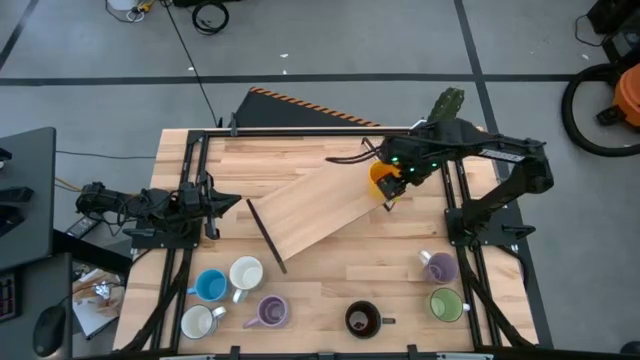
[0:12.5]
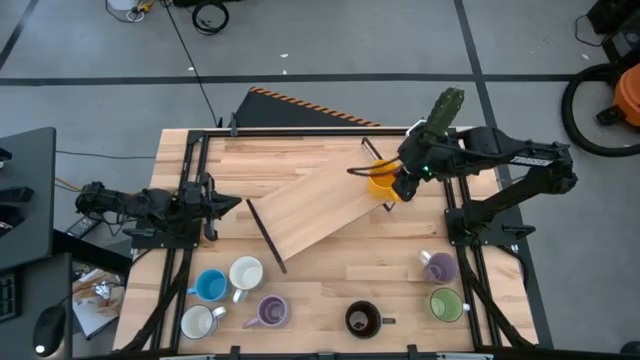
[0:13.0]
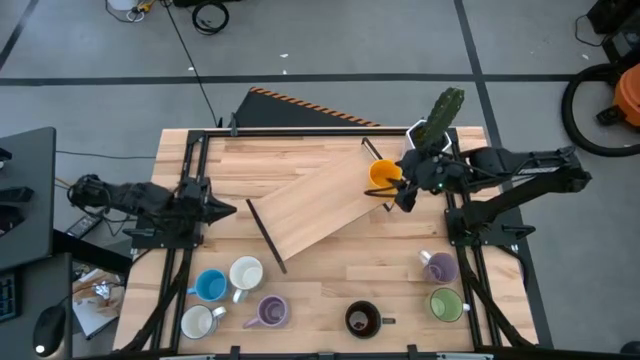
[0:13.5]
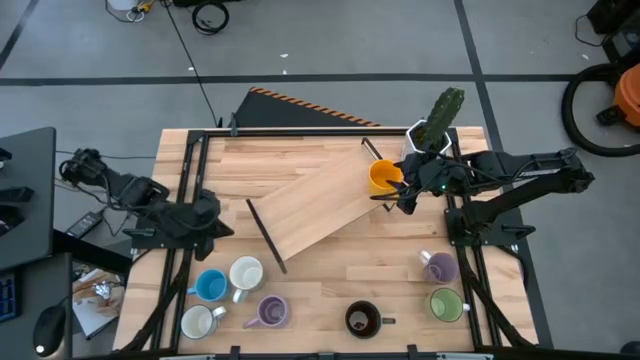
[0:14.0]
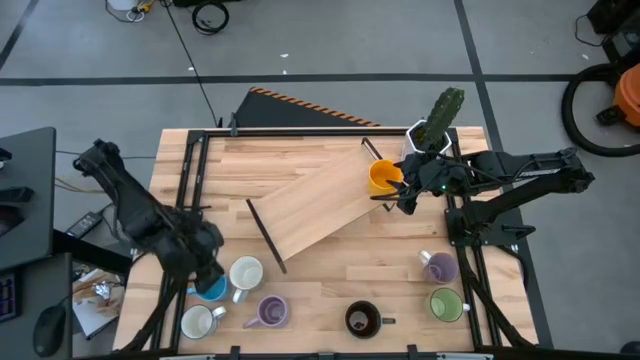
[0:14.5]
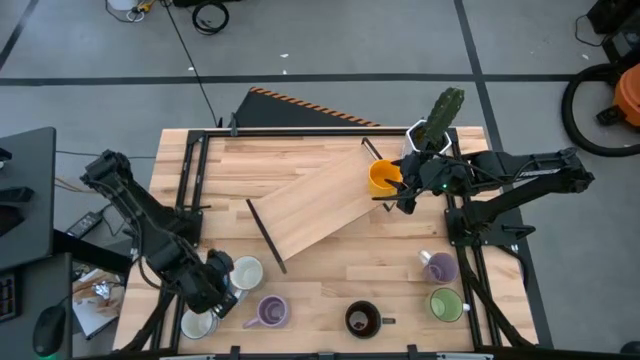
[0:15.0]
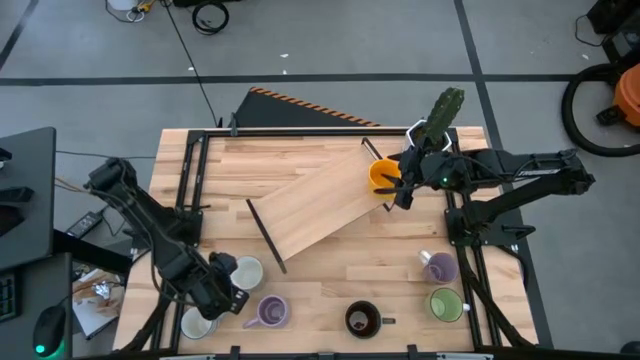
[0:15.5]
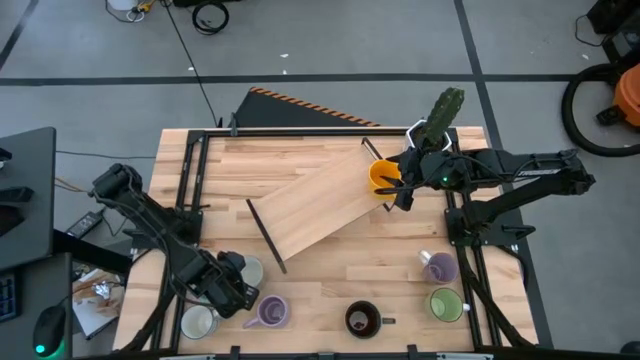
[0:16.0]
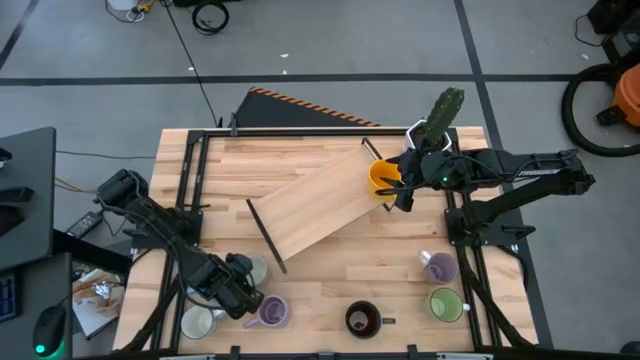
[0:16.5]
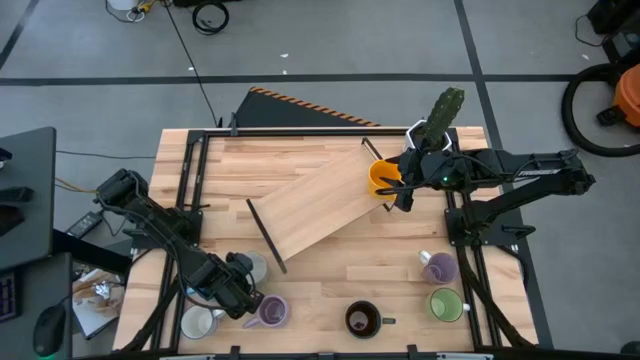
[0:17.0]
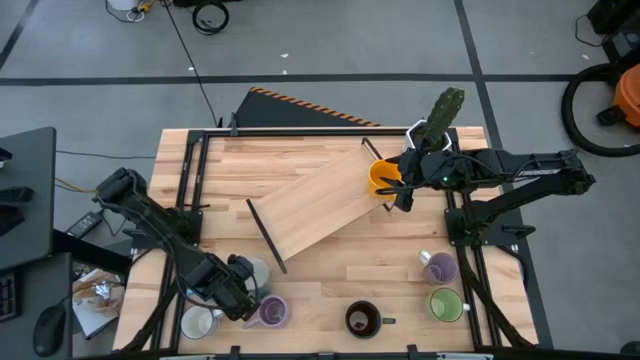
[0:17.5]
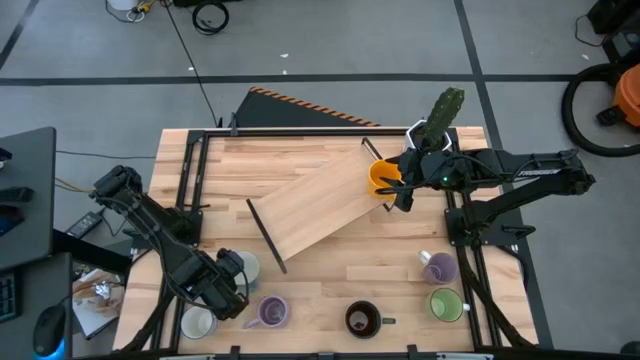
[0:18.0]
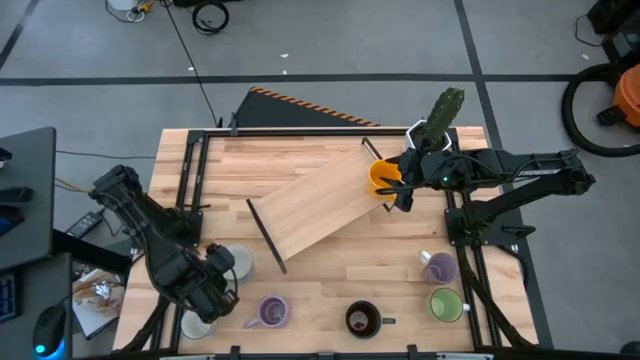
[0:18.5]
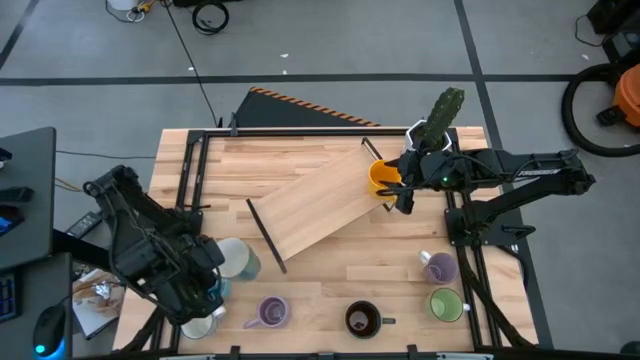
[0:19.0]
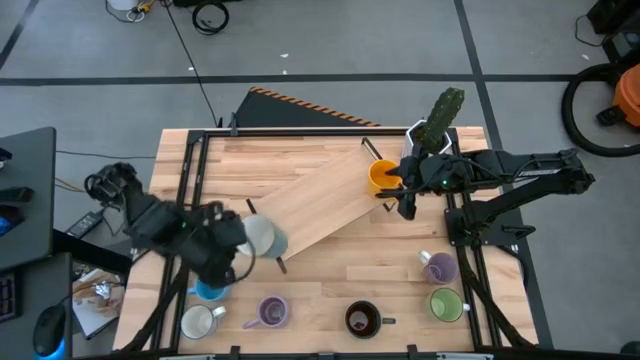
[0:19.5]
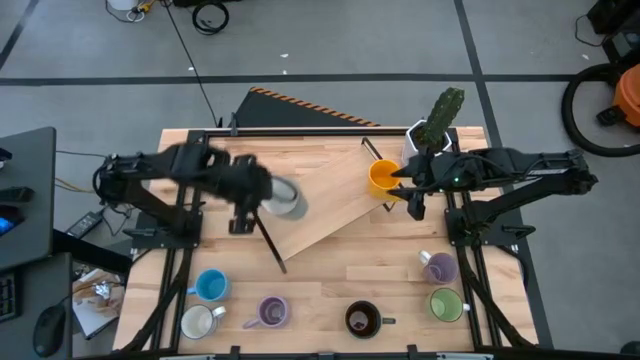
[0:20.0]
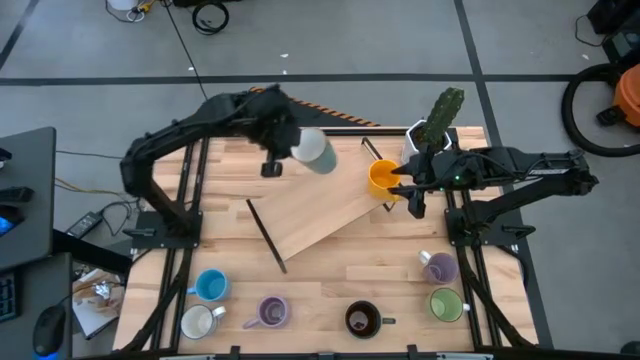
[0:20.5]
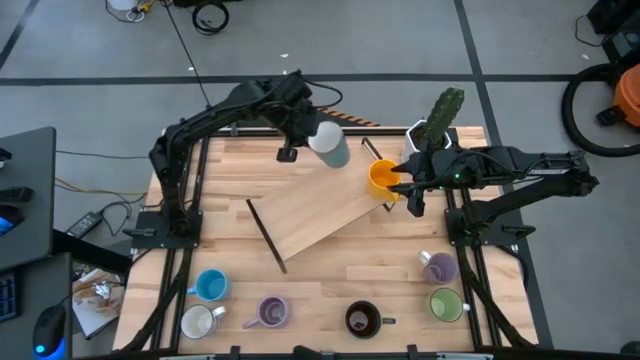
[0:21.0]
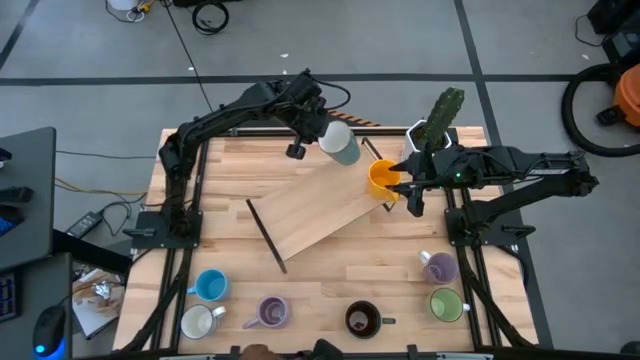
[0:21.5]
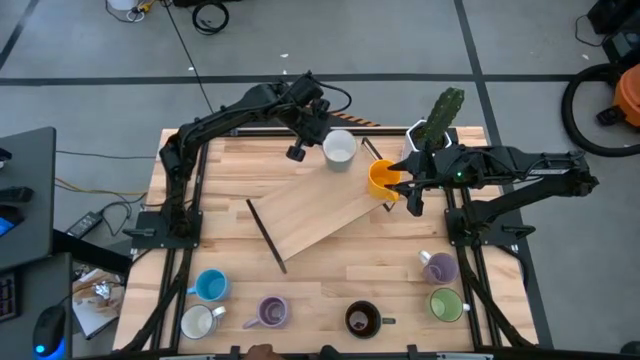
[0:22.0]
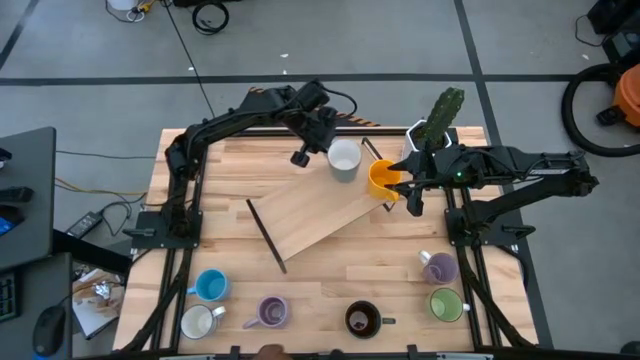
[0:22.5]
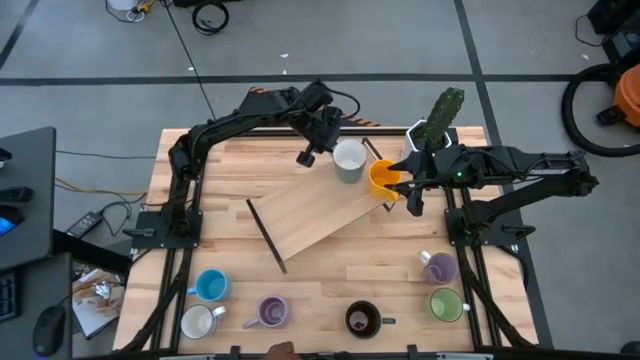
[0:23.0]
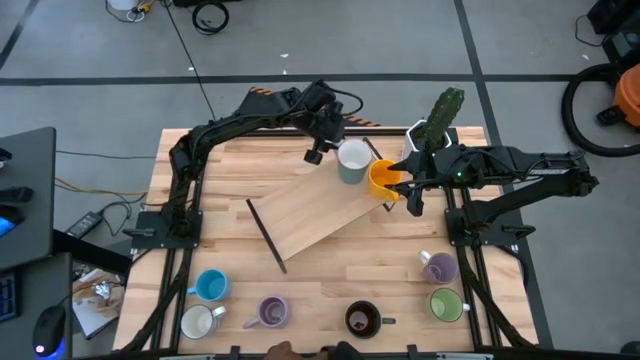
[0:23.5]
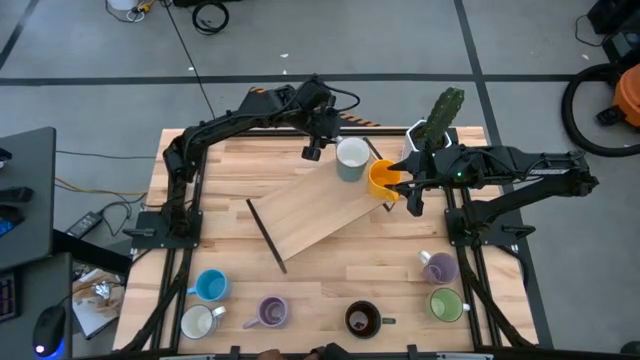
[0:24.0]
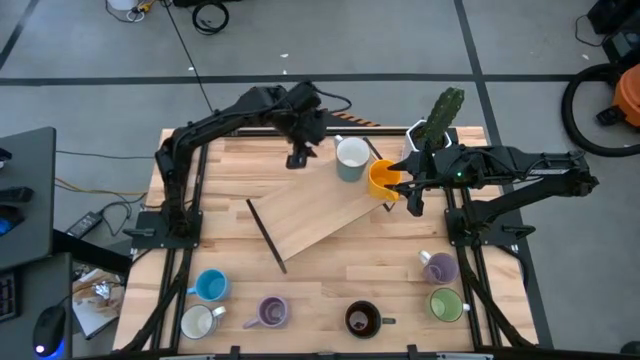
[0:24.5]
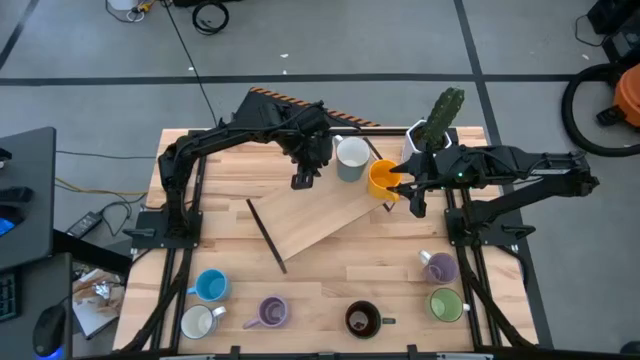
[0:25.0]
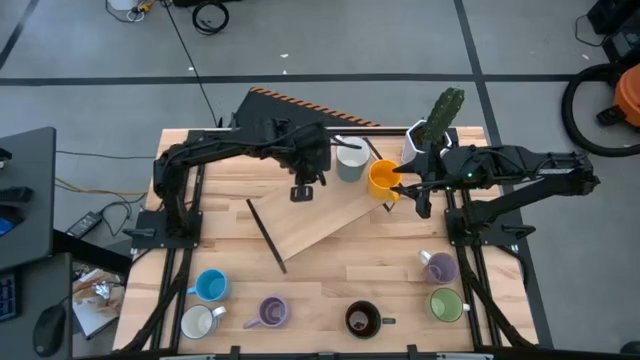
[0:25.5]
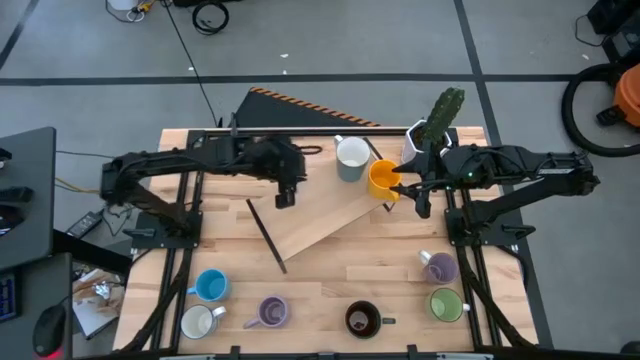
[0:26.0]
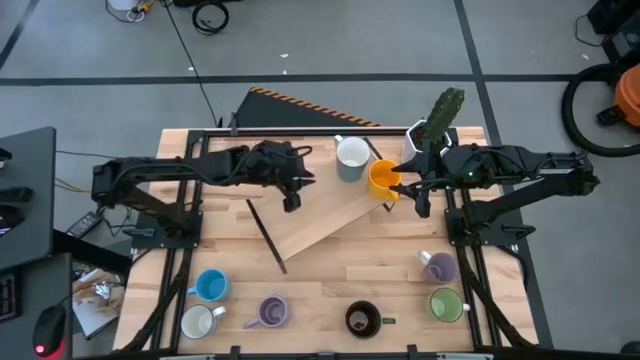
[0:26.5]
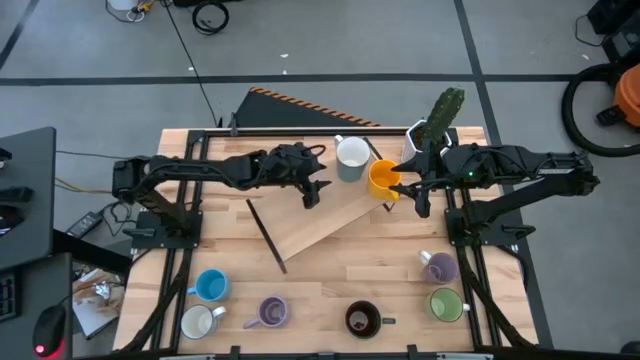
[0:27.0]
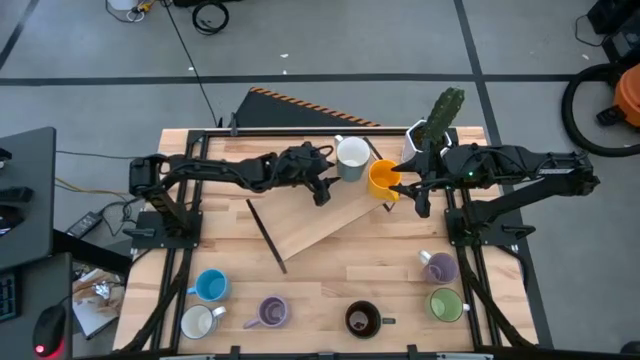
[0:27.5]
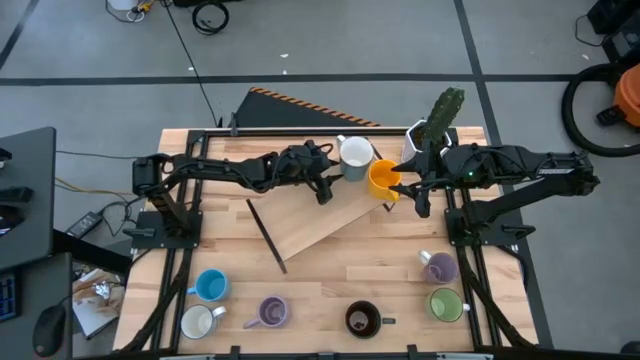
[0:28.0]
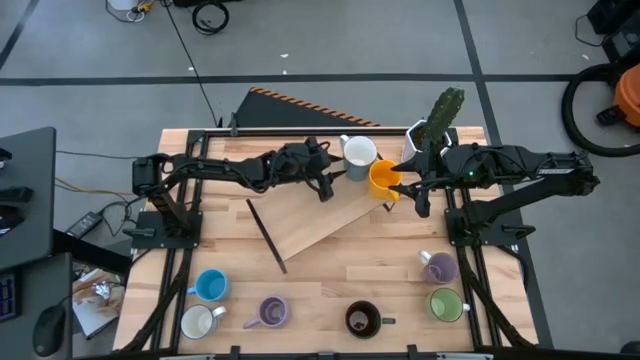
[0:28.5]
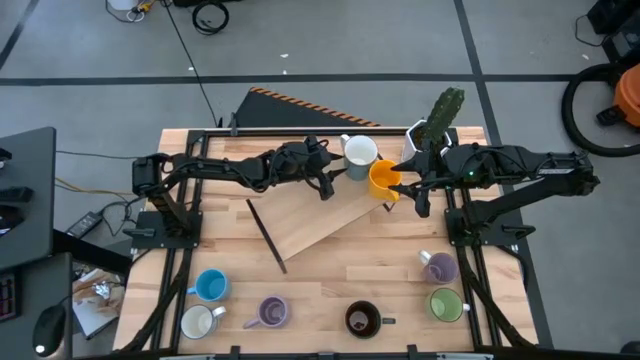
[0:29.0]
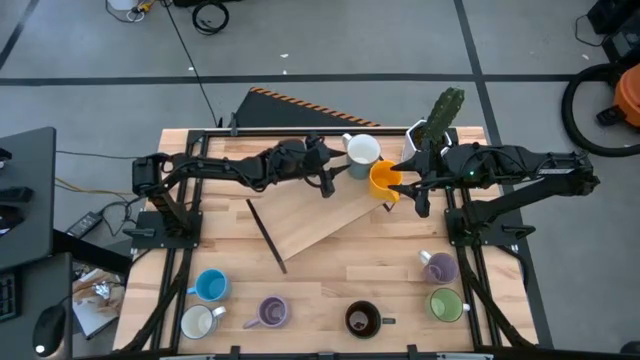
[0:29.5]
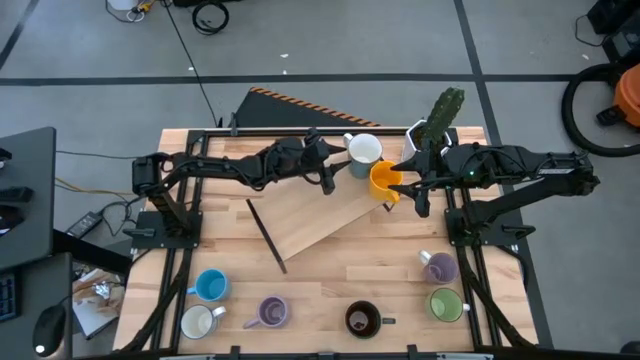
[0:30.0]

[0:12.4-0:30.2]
Task: Place coffee mugs
Put the blue mug on the shelf

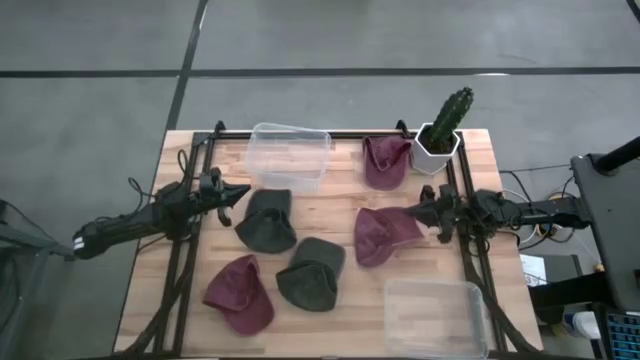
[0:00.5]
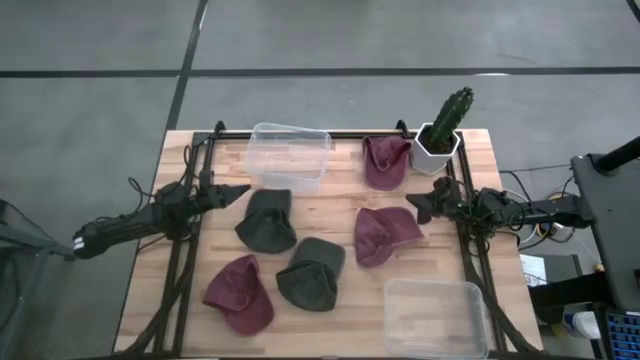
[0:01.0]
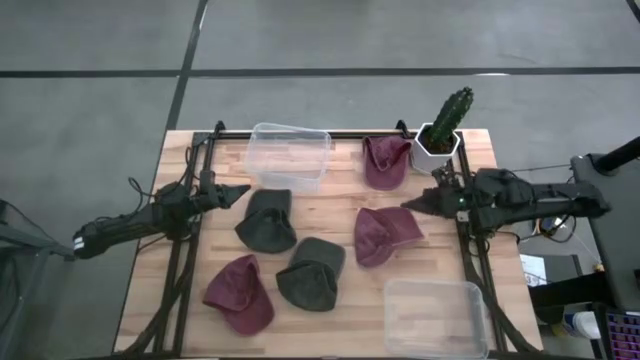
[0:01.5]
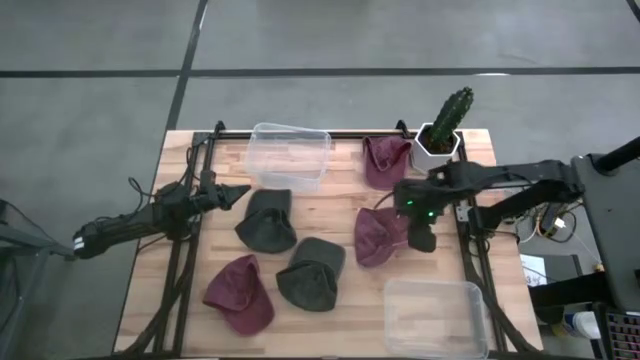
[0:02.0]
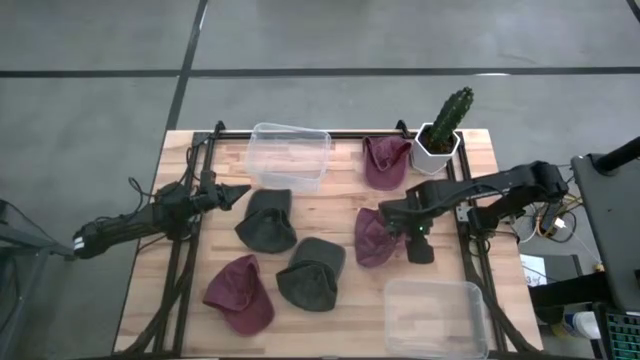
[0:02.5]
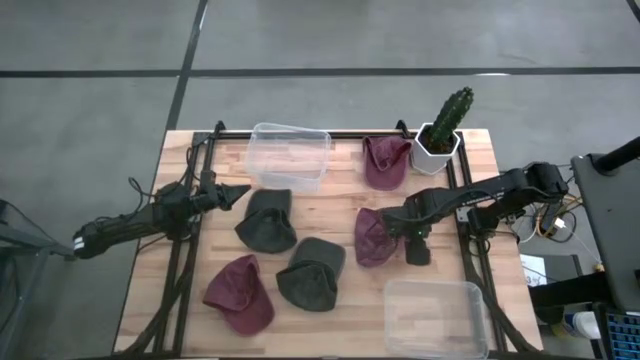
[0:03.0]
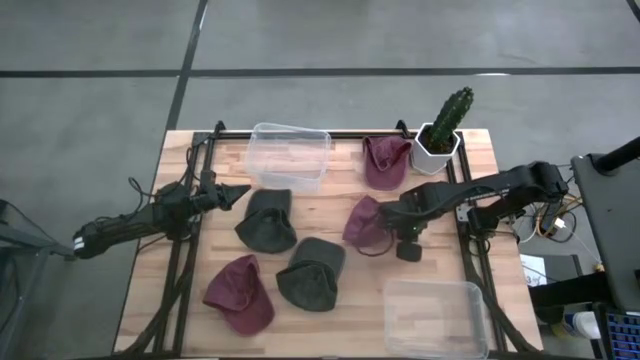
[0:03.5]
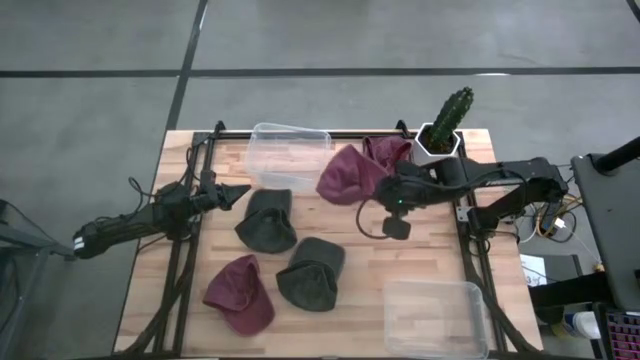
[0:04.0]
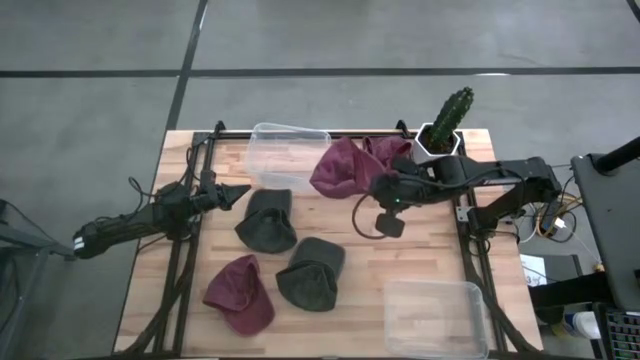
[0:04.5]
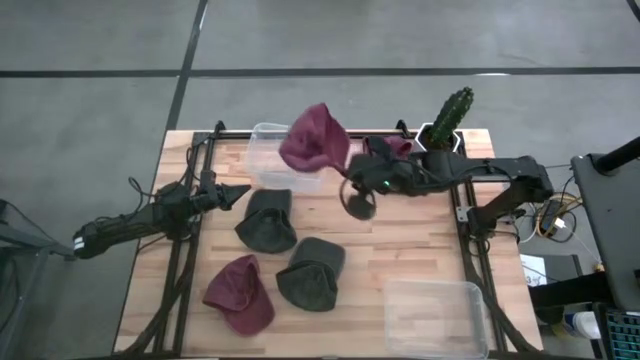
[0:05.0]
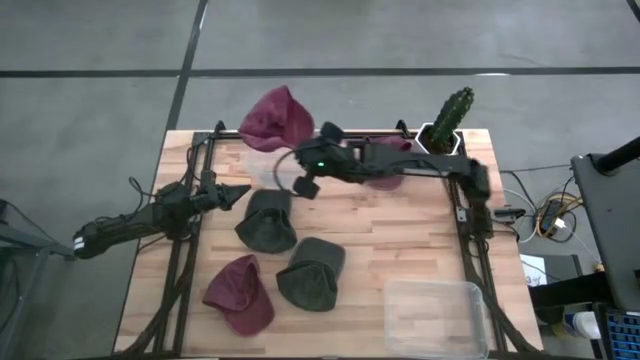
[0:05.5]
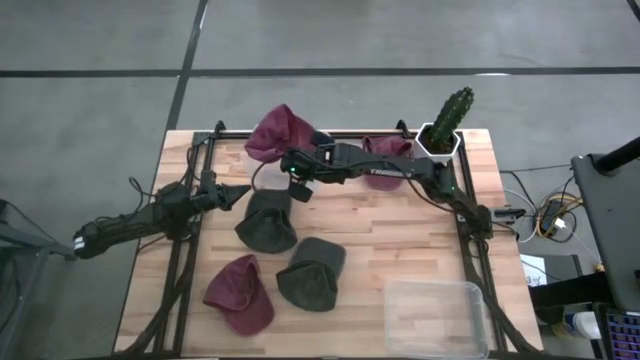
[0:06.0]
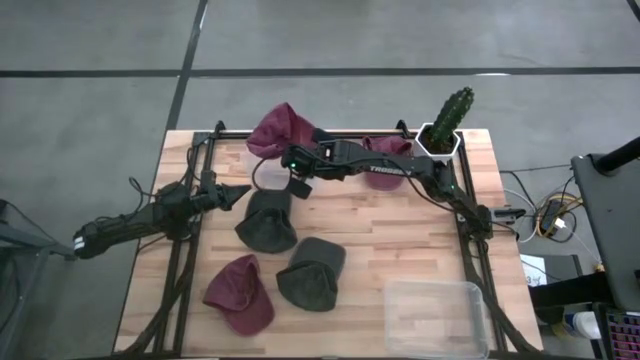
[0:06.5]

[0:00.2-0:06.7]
Task: Pick and place caps into container
Put the middle red cap into the top transparent container
